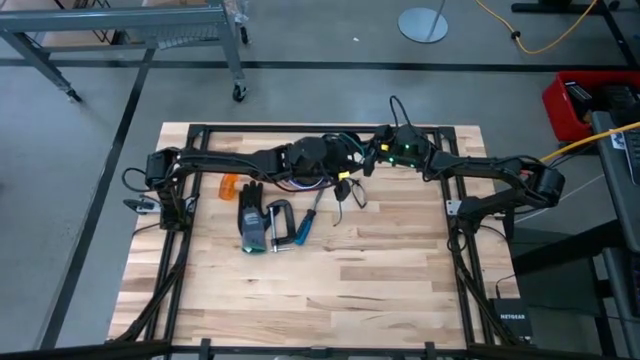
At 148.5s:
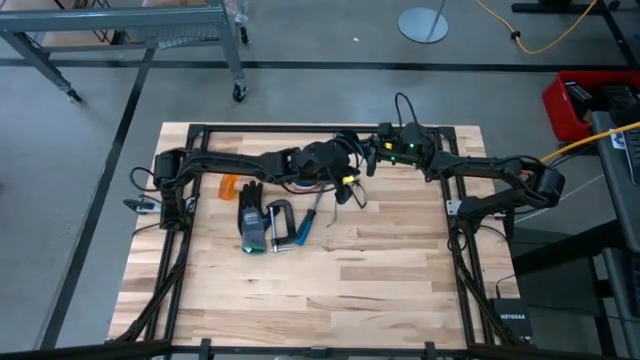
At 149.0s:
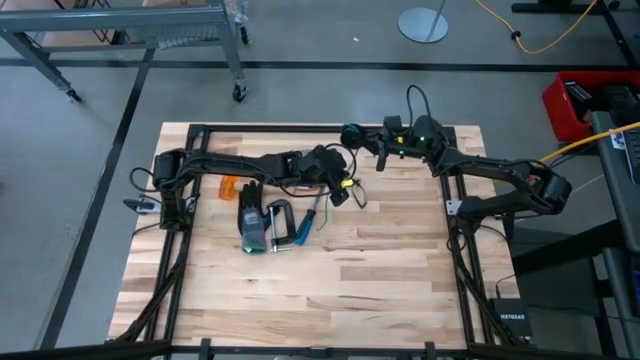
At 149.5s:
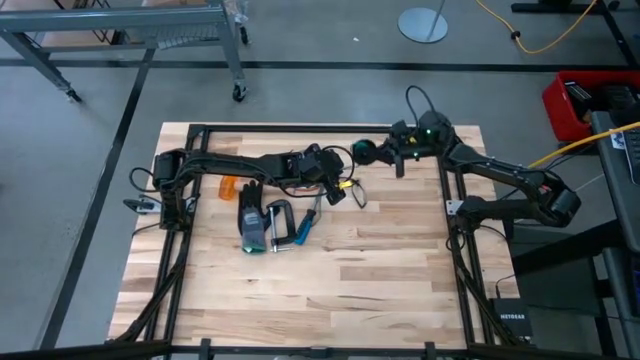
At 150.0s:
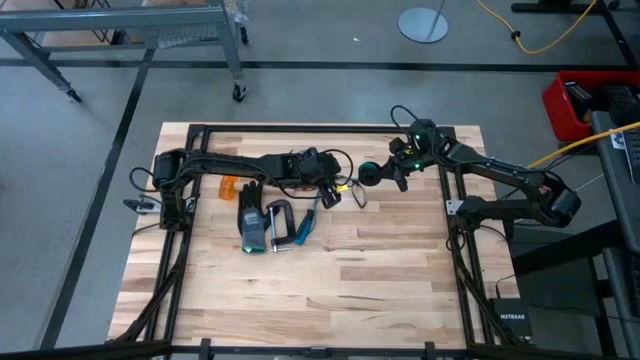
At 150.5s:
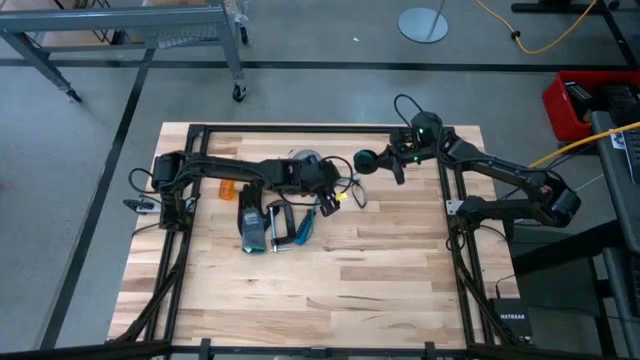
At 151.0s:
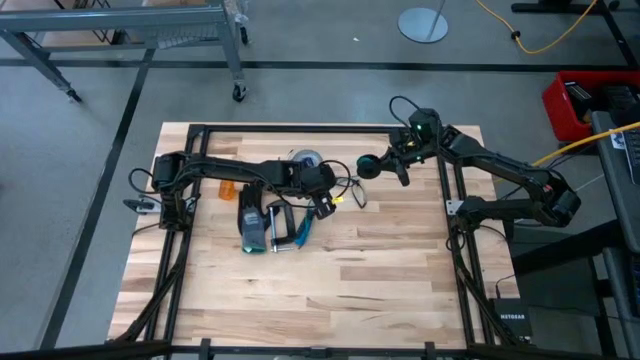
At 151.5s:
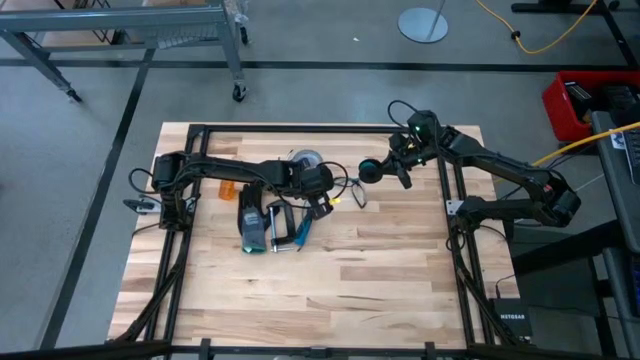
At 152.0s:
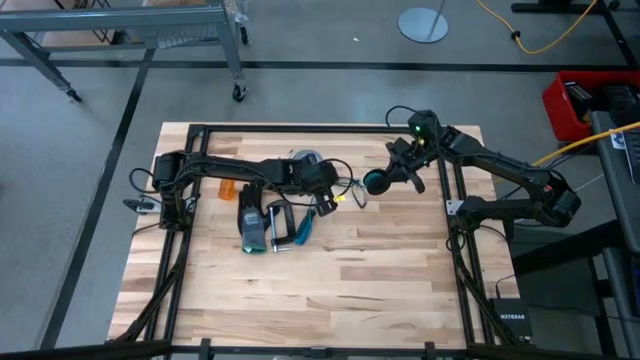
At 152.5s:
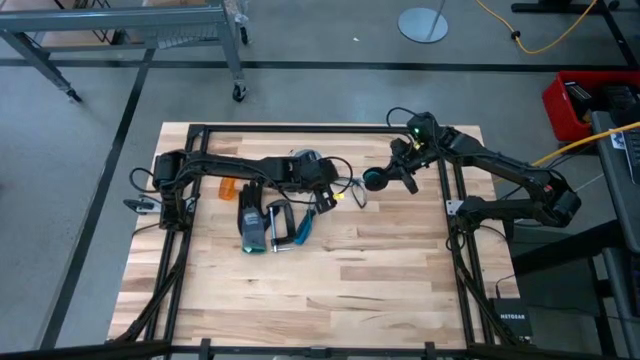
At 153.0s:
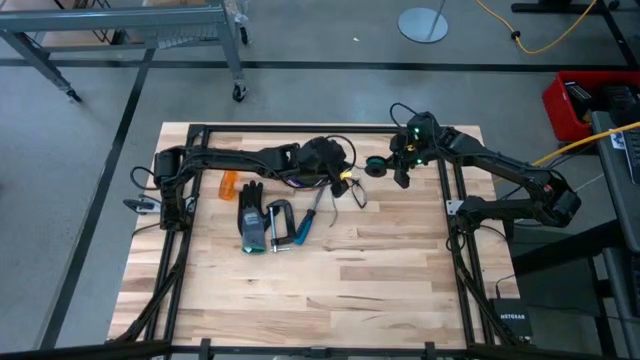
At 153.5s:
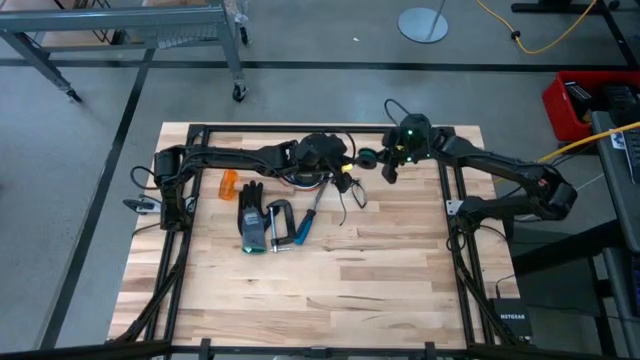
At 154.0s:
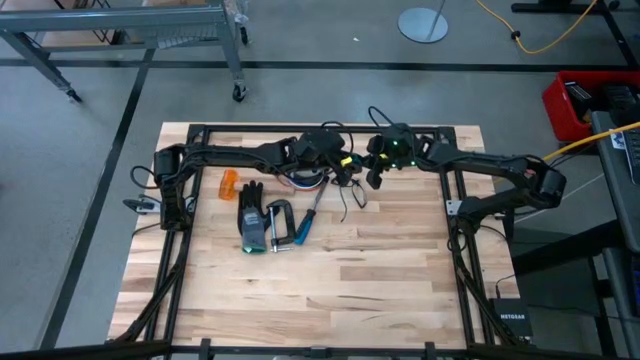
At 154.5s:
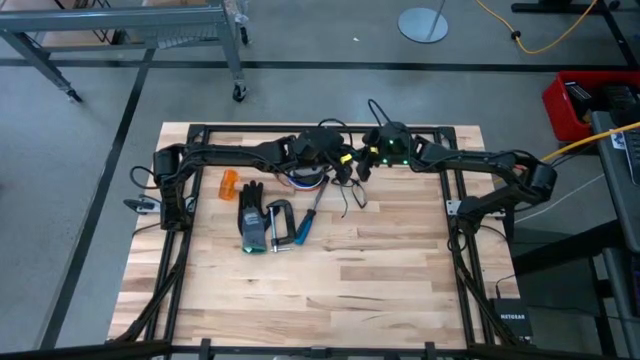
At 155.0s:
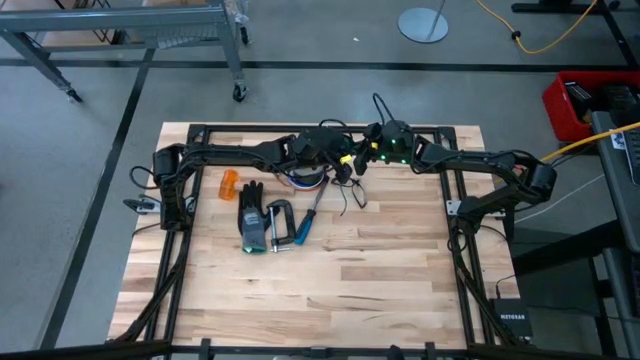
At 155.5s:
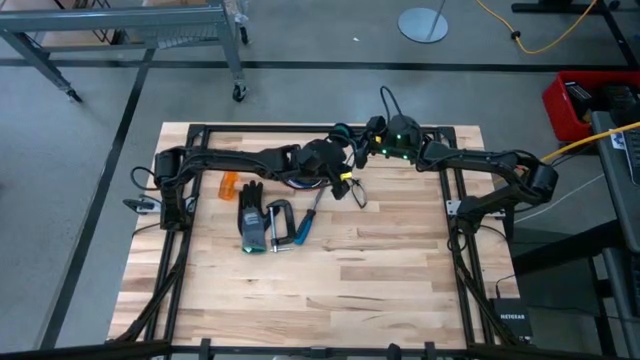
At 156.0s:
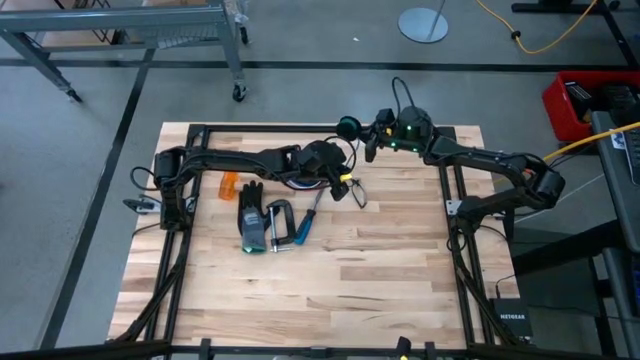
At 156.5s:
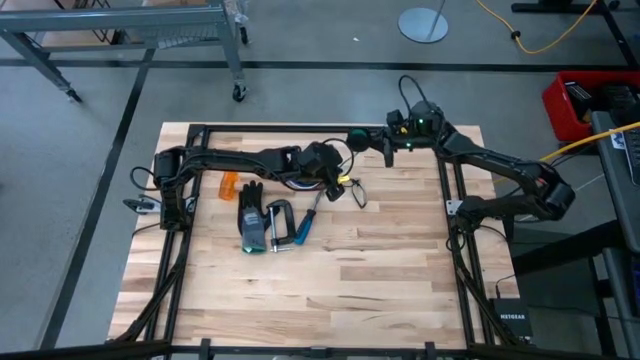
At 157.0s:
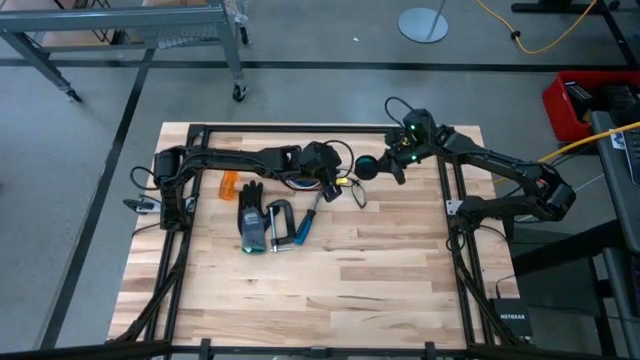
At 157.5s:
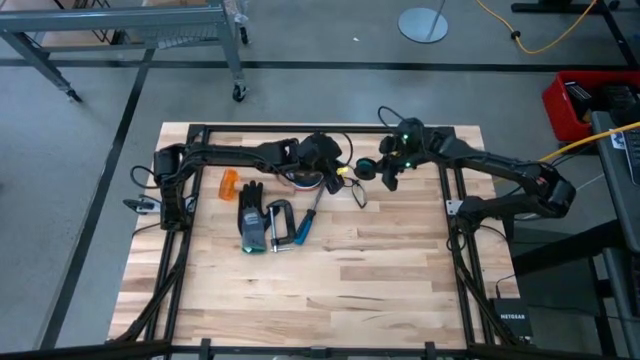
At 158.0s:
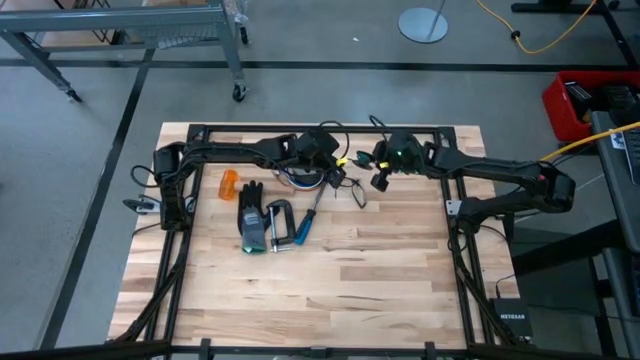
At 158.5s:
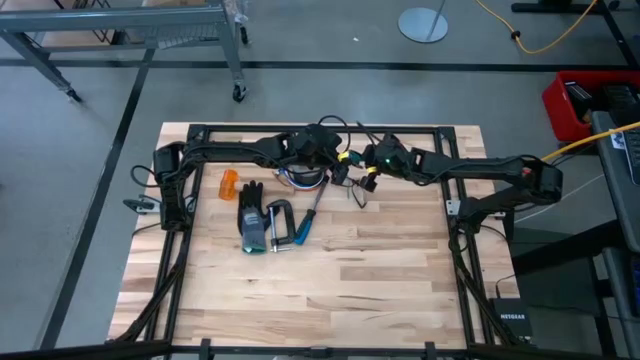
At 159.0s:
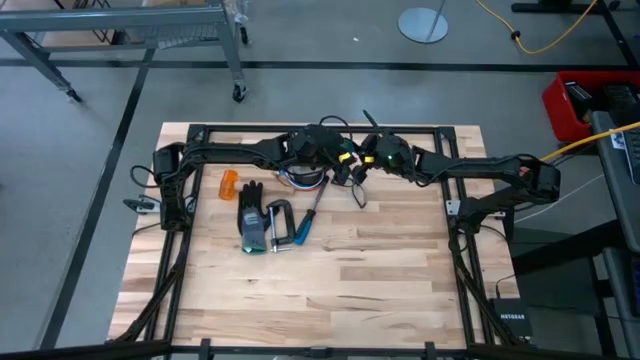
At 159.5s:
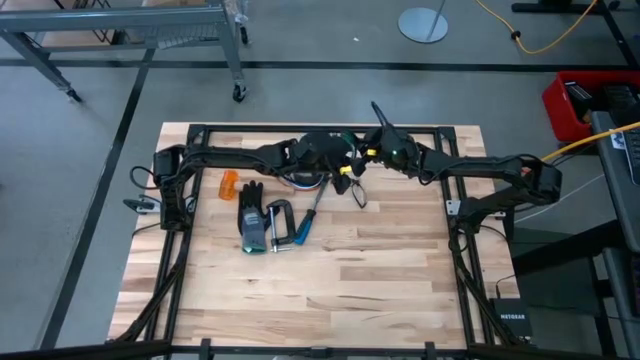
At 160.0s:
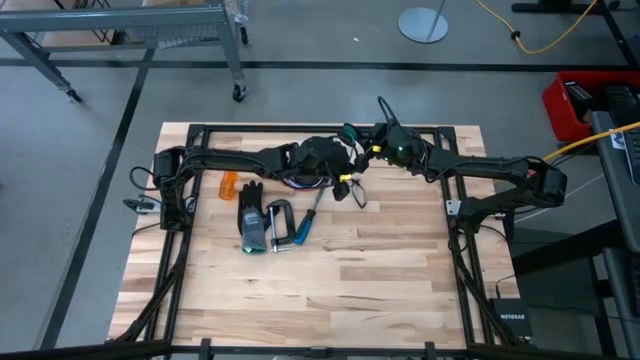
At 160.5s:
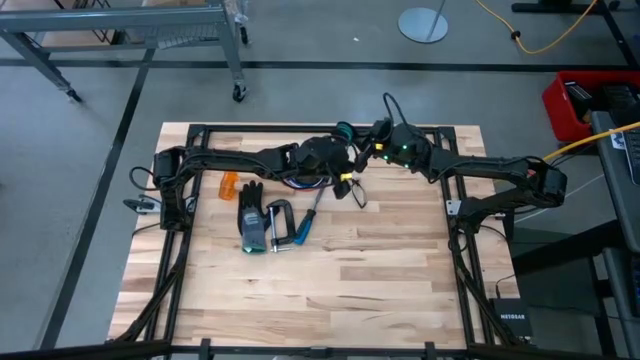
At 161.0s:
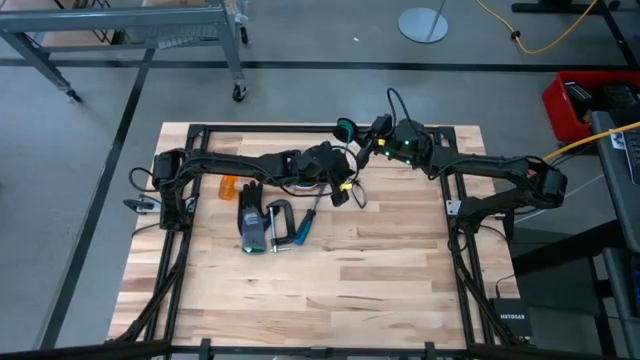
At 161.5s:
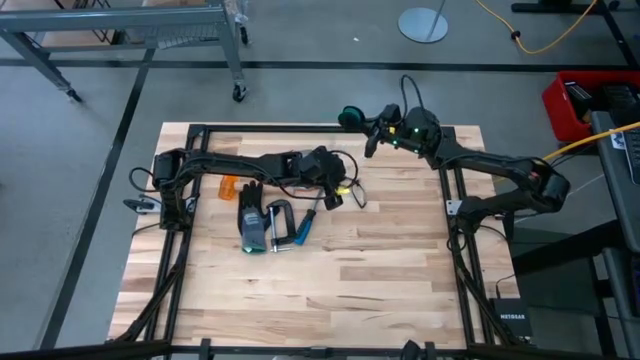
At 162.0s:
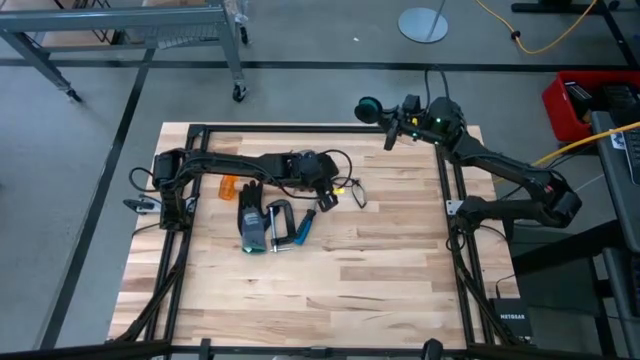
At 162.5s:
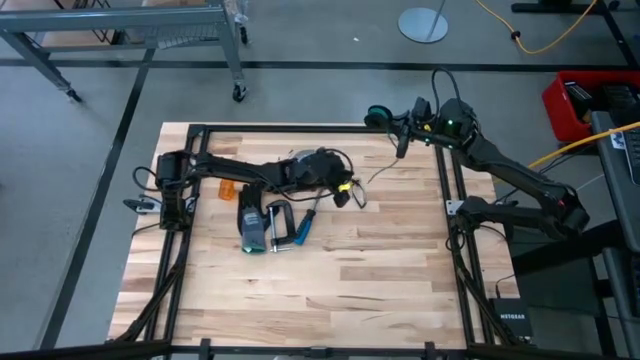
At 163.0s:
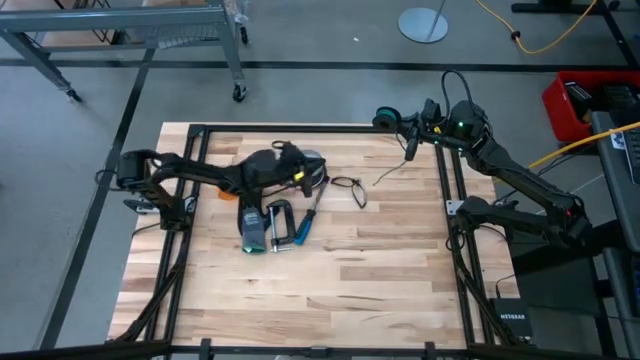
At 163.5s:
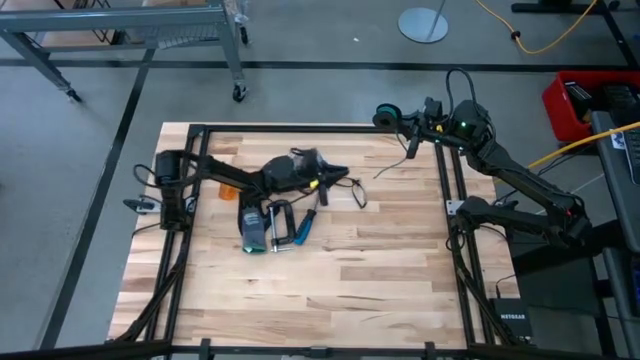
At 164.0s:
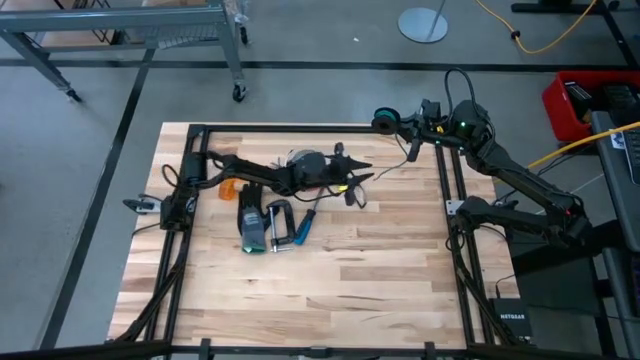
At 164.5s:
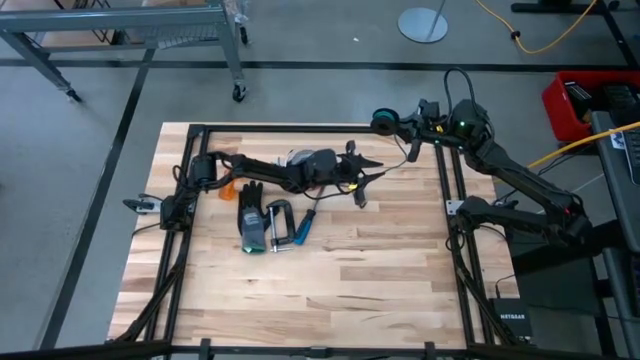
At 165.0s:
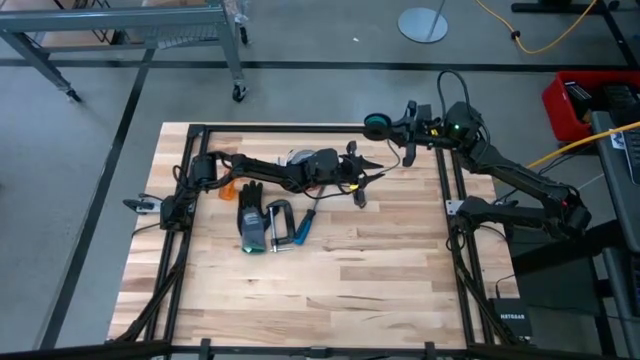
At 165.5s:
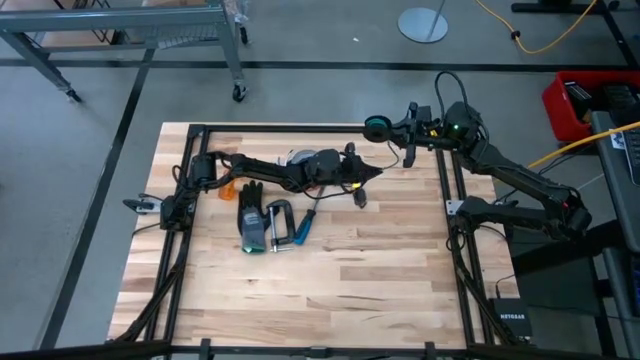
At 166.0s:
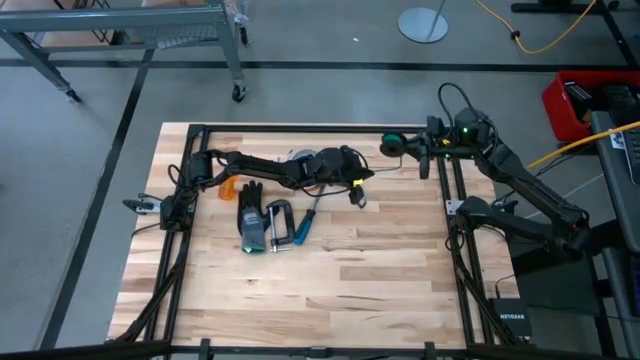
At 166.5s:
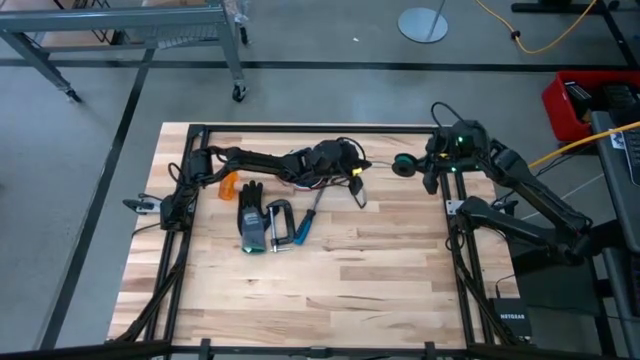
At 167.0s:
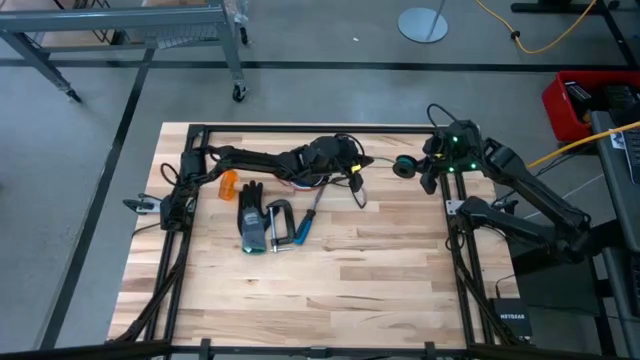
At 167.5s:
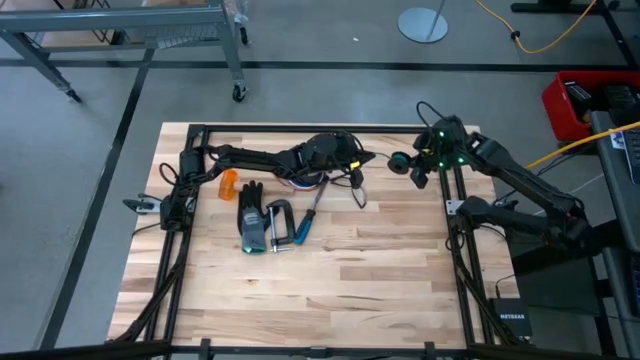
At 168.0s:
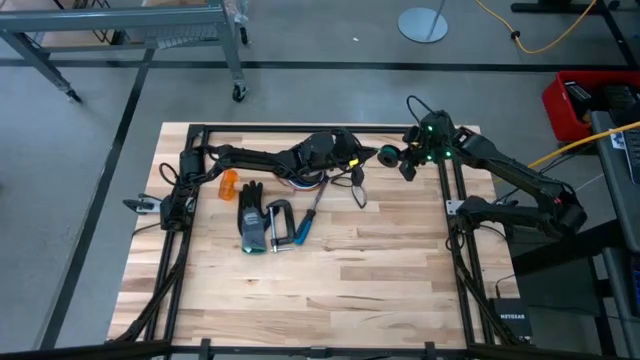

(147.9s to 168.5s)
Task: Coil cords
Coil the wire in the cable spool
